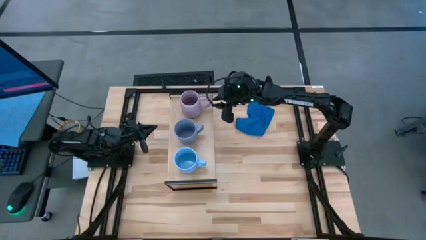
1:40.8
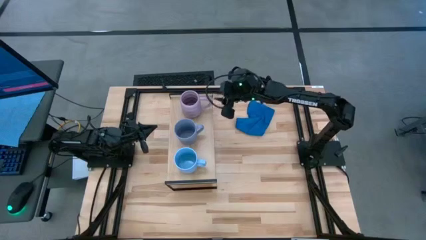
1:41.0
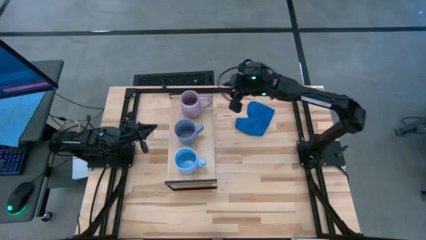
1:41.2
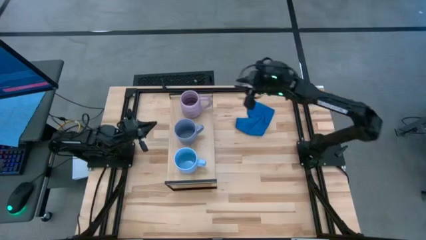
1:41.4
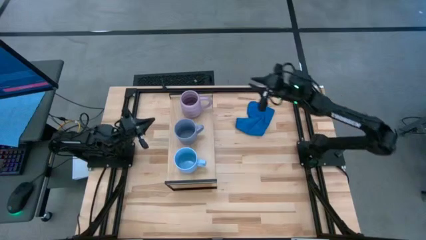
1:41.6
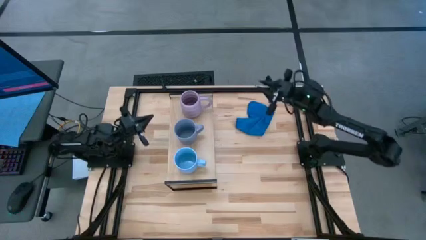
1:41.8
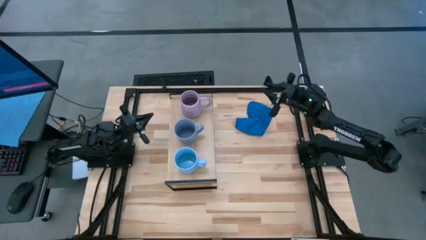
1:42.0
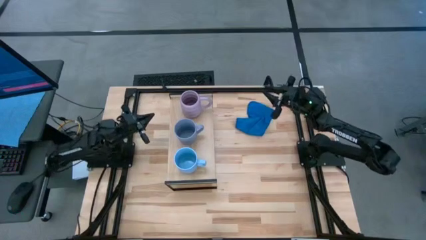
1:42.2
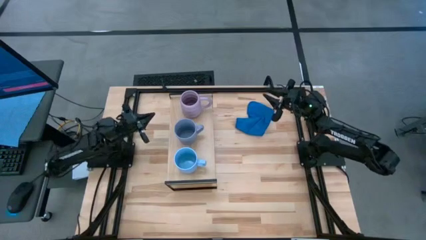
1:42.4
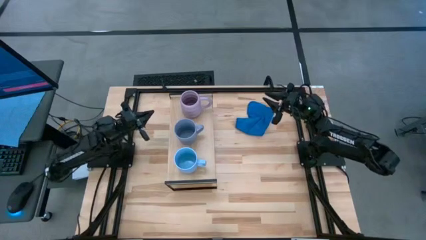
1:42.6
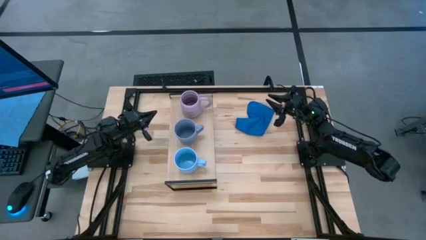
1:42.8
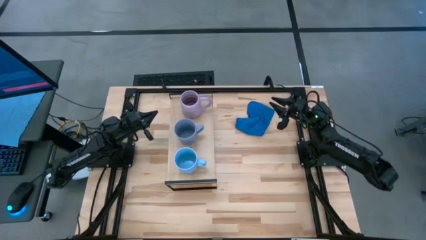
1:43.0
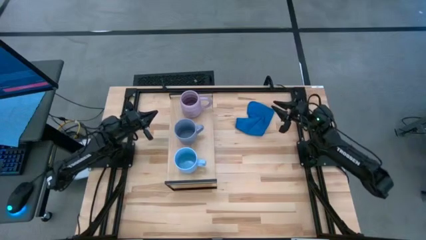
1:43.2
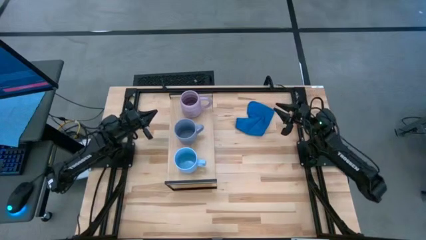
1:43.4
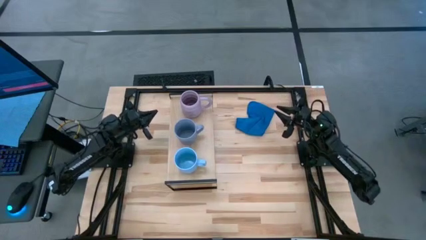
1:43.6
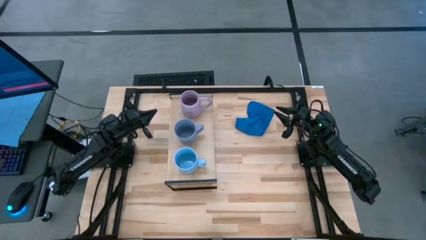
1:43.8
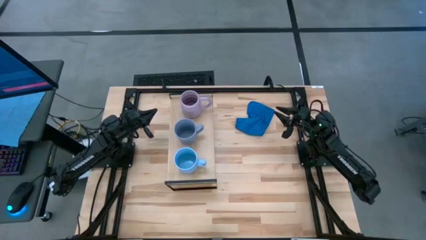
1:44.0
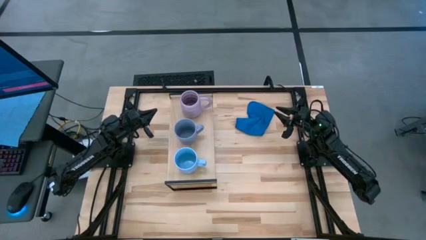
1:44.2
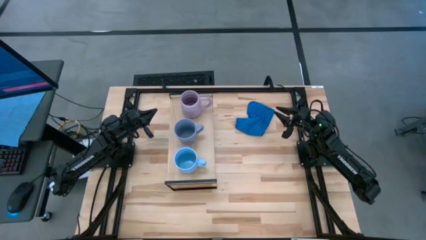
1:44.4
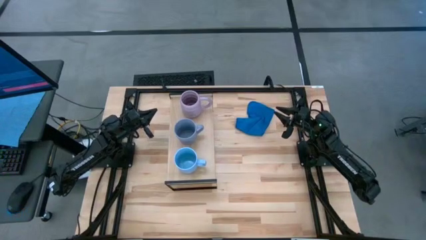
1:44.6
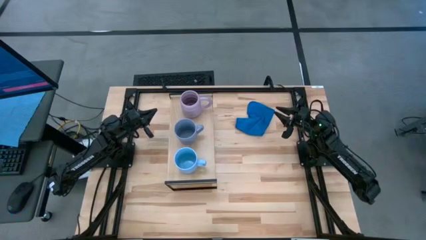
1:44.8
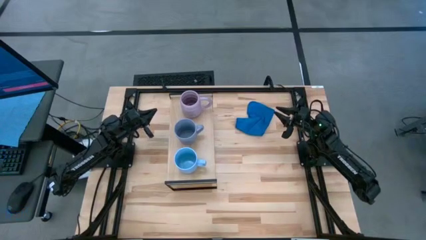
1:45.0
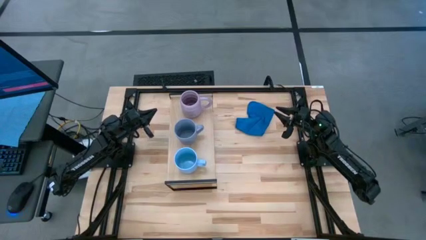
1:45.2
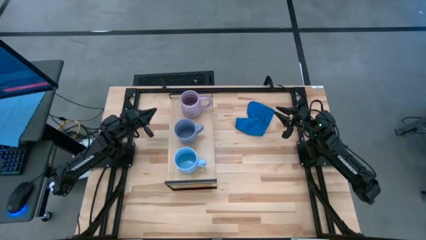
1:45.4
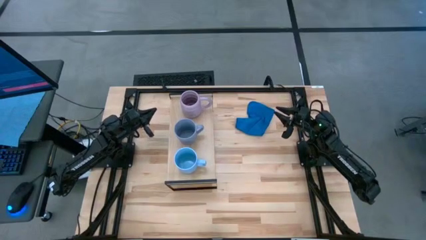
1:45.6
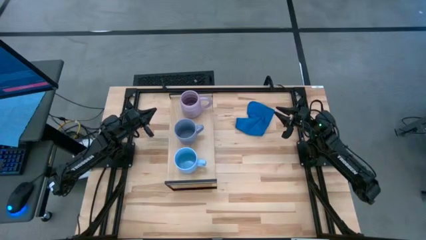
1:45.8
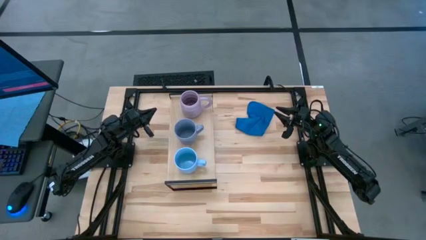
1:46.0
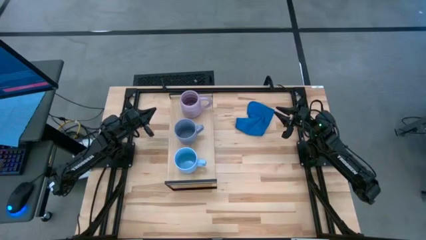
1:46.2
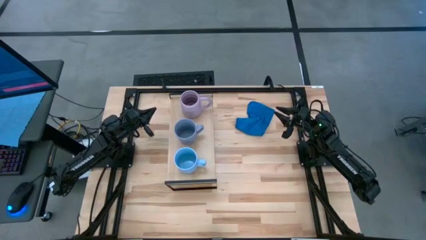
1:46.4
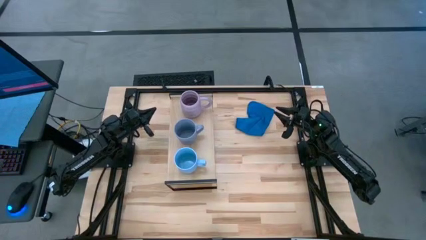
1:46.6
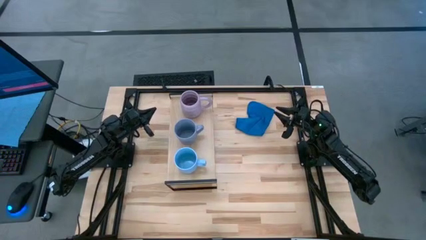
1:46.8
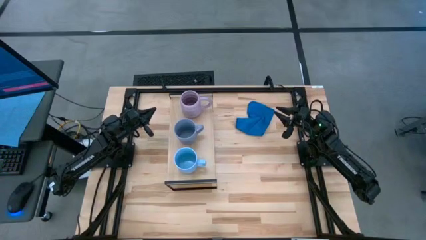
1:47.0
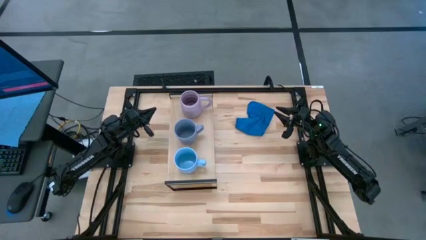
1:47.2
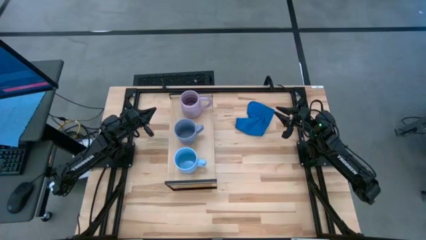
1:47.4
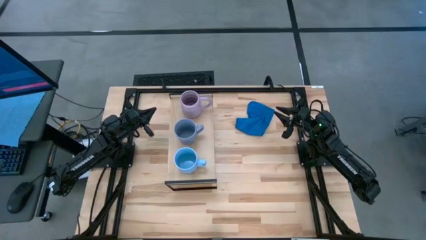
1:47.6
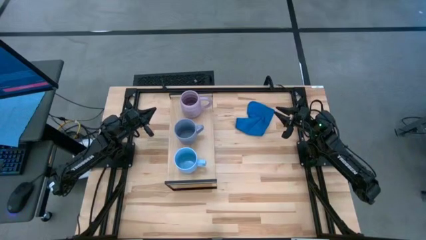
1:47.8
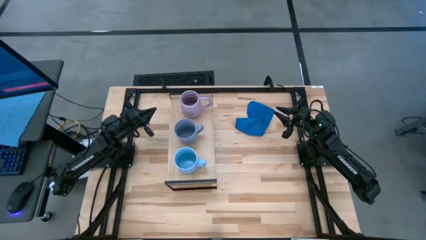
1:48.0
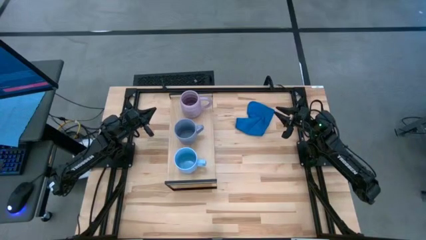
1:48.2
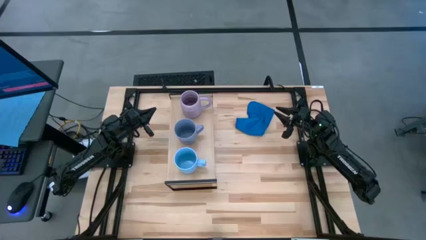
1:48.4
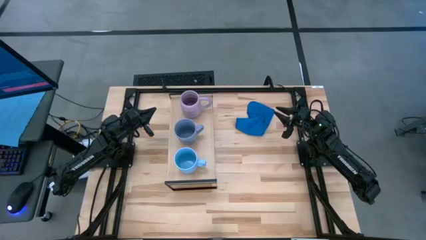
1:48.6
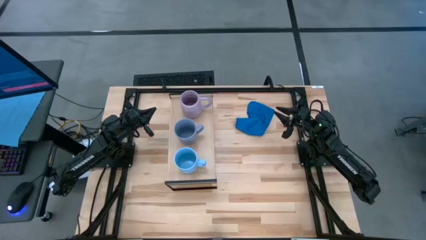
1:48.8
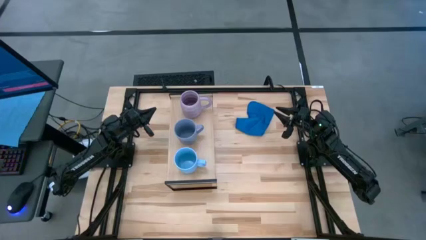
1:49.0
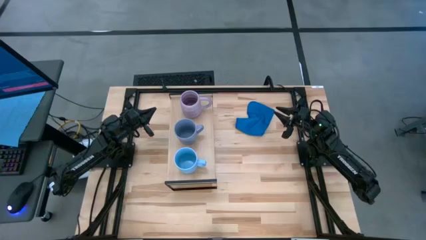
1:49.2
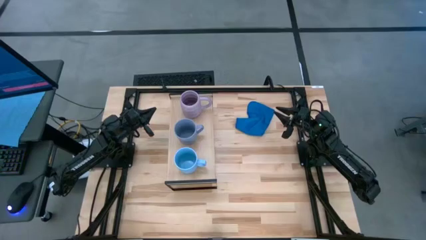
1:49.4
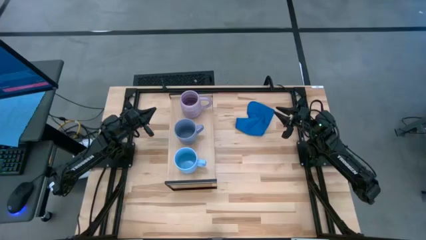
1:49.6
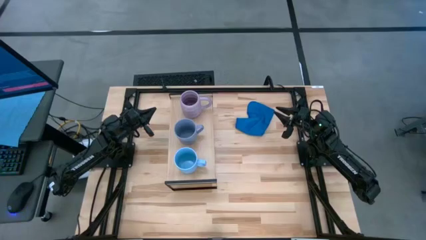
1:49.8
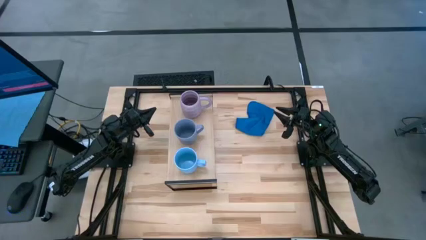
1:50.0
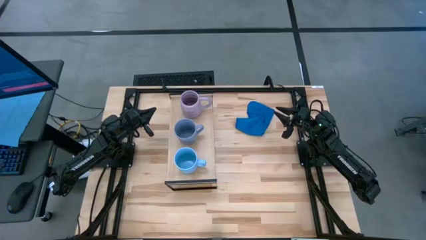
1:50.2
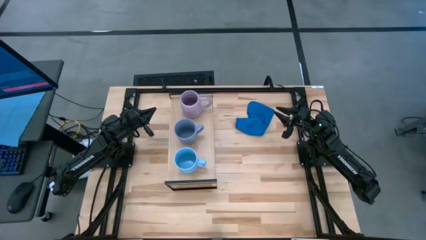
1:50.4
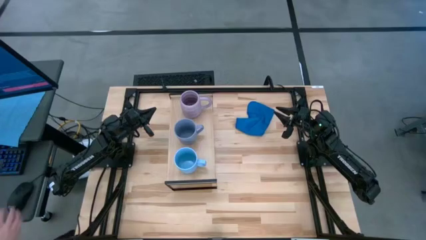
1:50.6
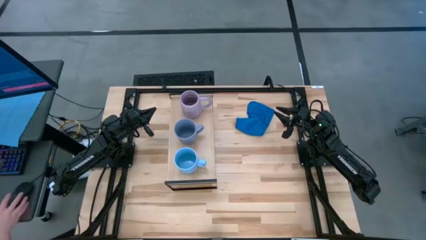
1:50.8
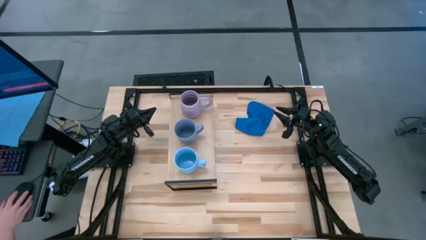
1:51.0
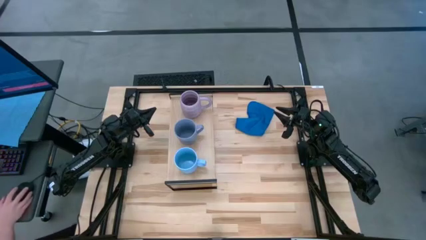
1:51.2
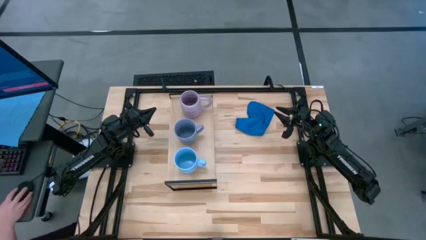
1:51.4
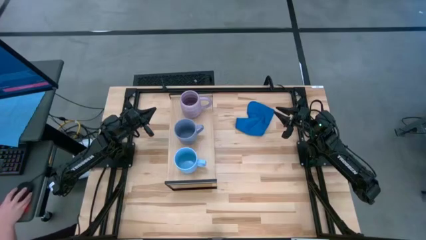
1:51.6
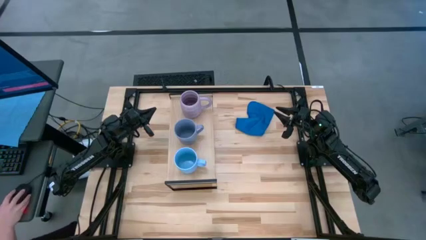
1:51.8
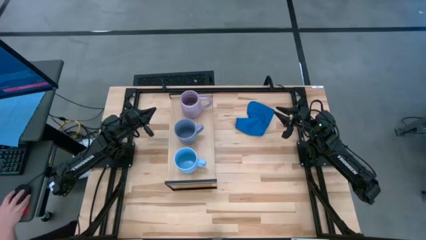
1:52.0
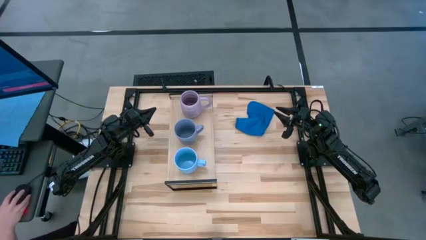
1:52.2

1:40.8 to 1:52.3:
Task: Stack small to large cups/mugs on shelf
Return to Home Position

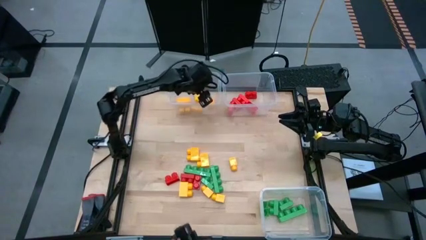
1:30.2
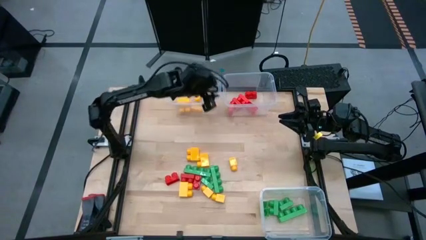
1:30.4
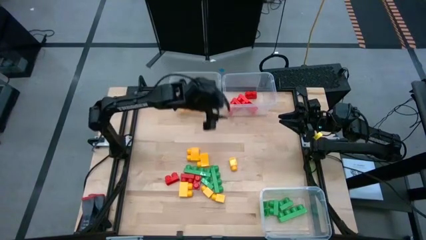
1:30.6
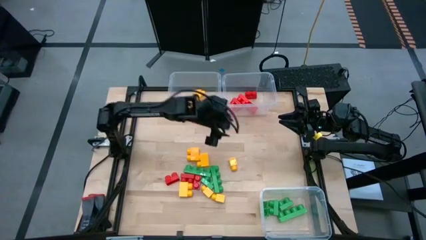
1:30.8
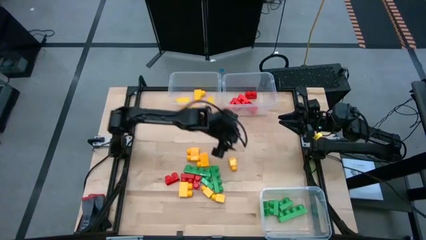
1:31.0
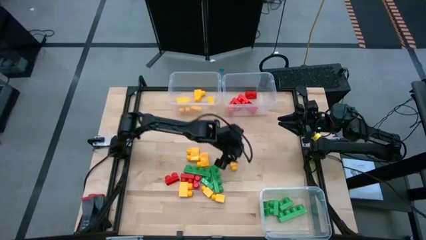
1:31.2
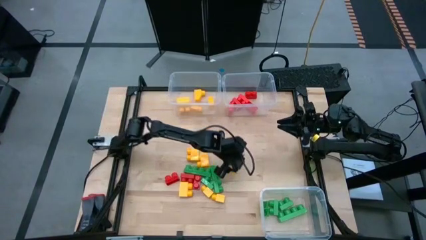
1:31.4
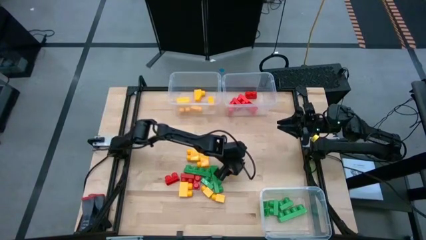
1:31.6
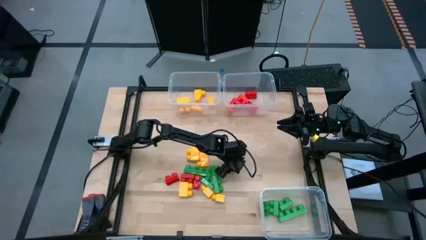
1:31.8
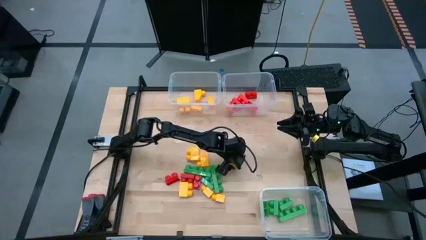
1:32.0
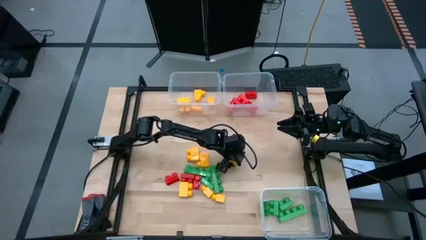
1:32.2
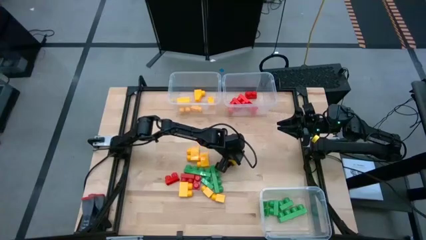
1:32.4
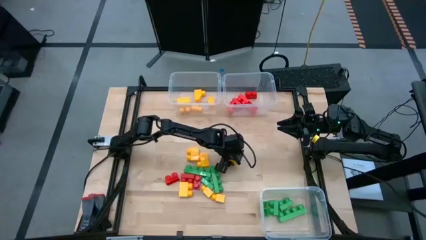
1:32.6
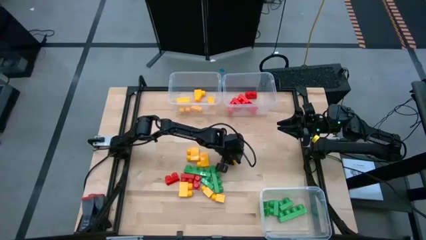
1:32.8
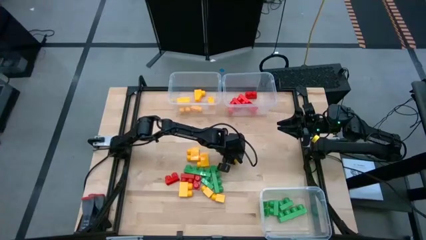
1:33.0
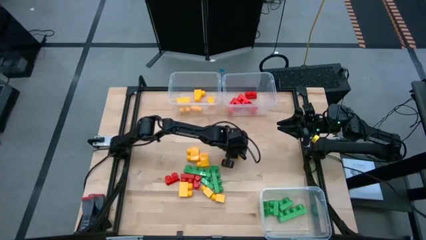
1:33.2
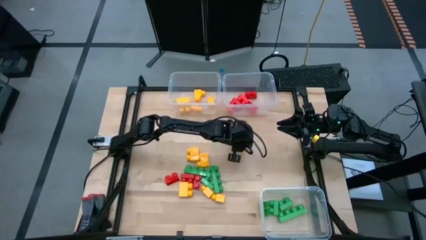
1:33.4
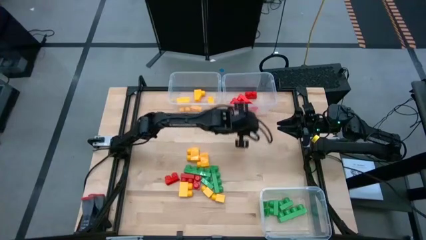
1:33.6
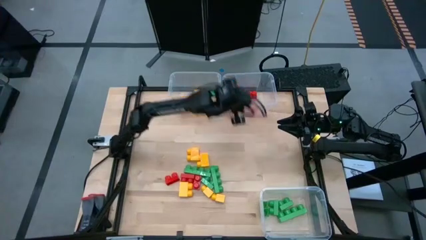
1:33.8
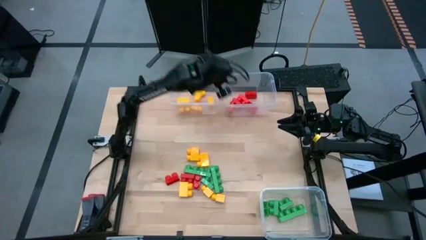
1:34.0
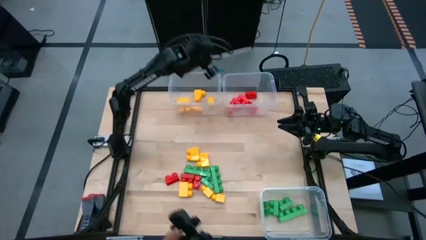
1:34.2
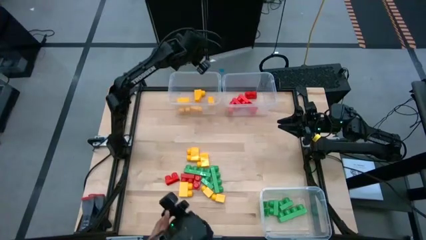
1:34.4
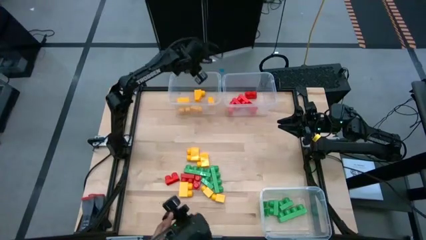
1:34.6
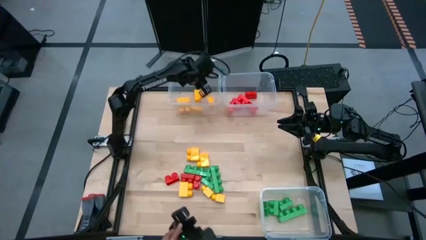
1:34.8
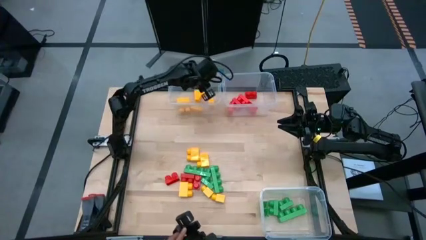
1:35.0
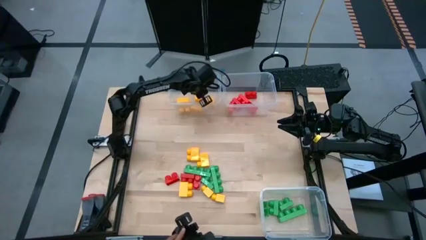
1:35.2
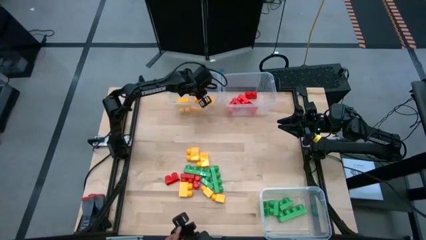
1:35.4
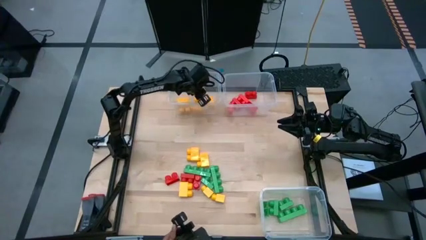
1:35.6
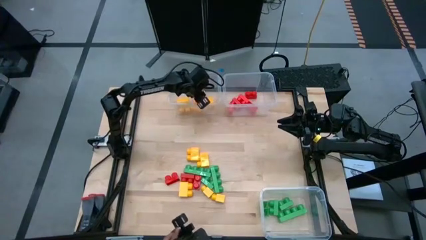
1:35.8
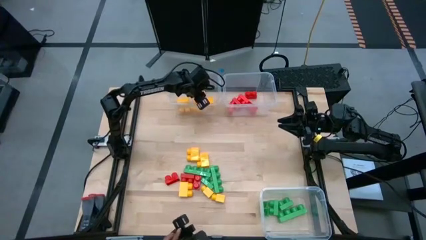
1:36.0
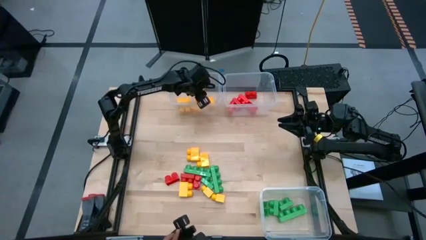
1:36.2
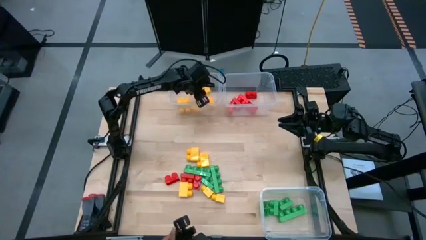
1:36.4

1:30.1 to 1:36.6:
Task: Sort blocks
Put the yellow game piece into the top left transparent bin
